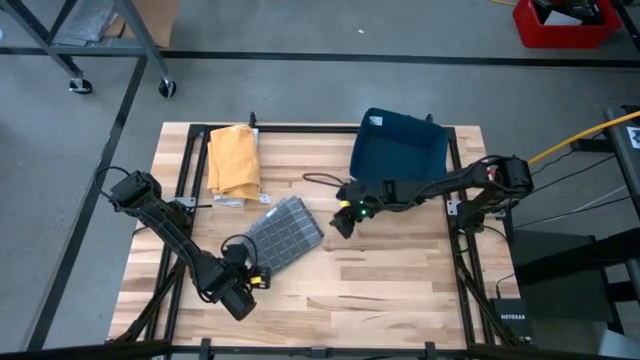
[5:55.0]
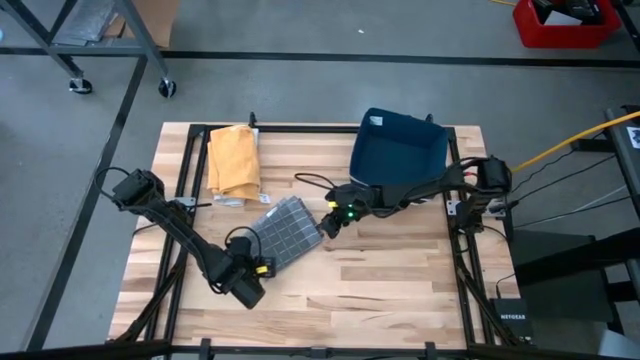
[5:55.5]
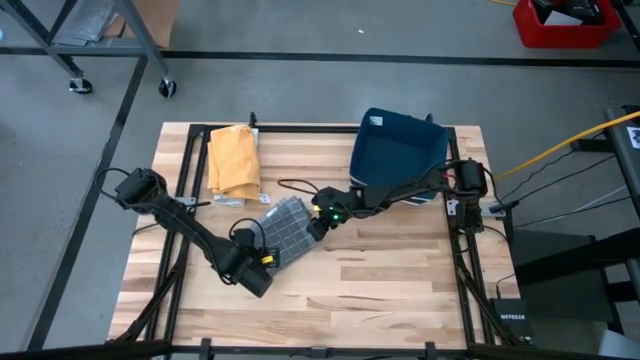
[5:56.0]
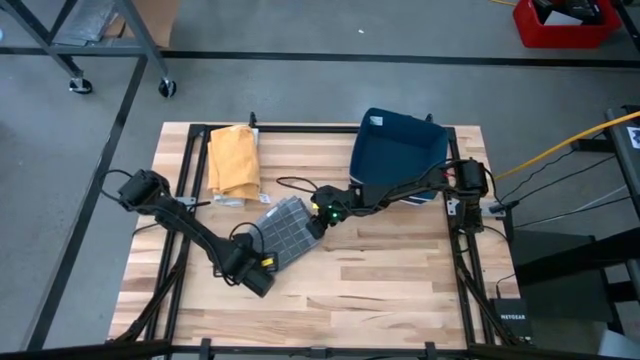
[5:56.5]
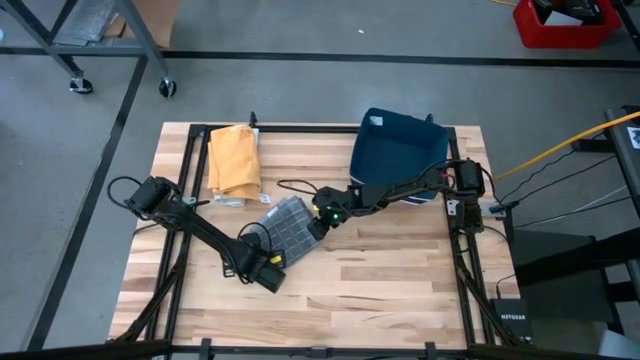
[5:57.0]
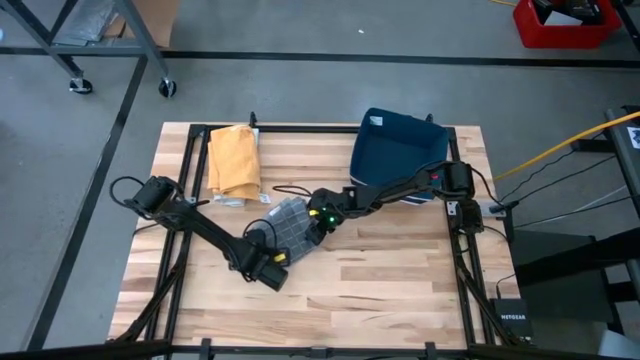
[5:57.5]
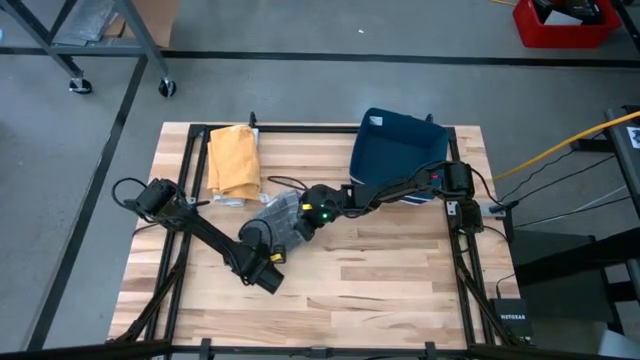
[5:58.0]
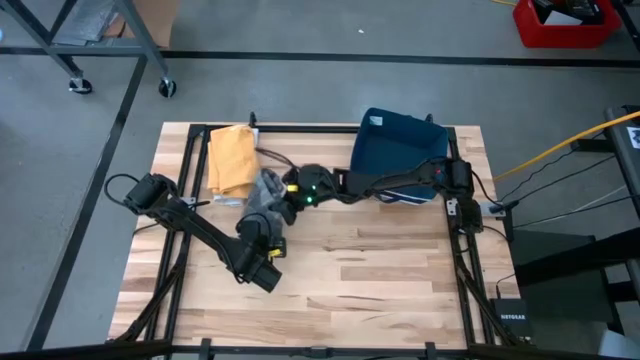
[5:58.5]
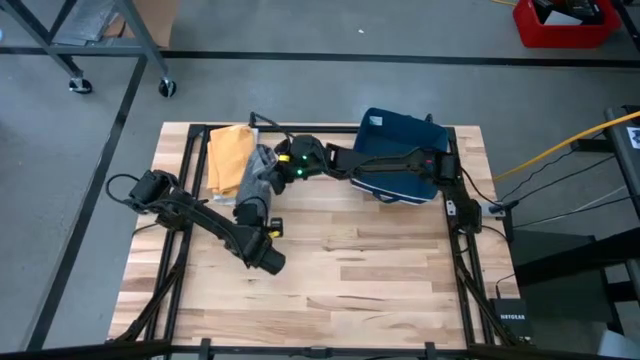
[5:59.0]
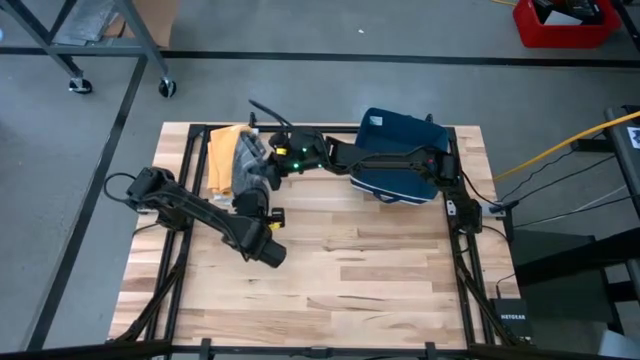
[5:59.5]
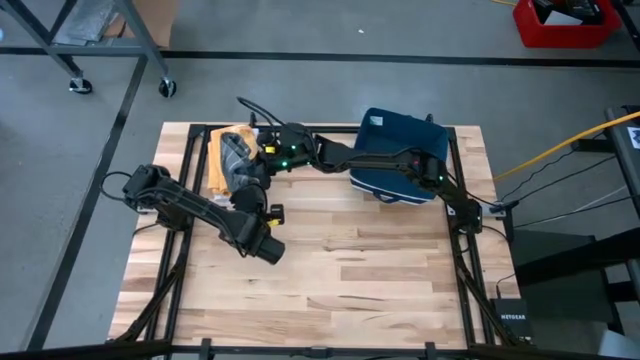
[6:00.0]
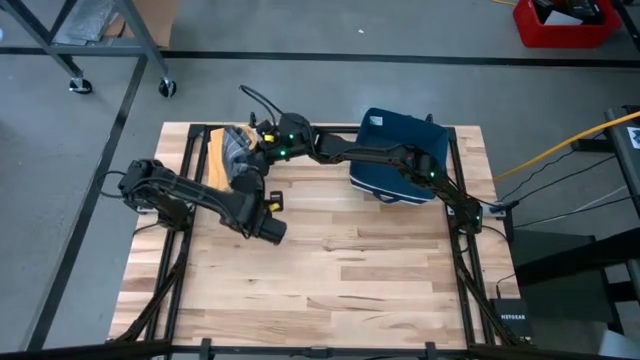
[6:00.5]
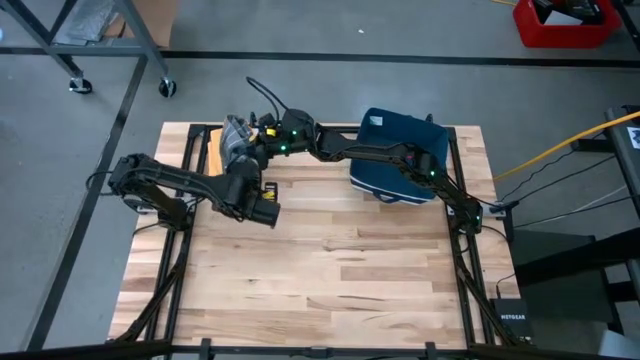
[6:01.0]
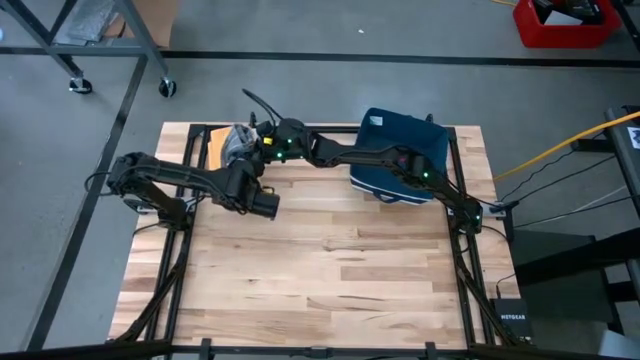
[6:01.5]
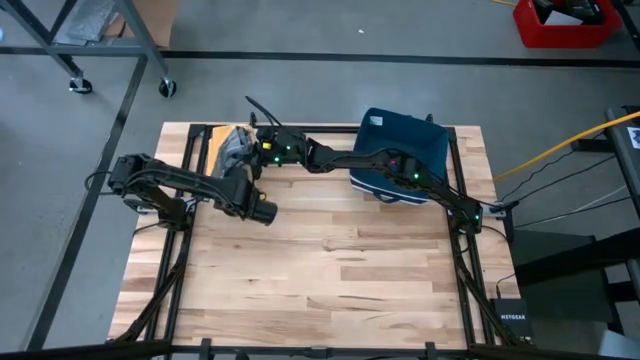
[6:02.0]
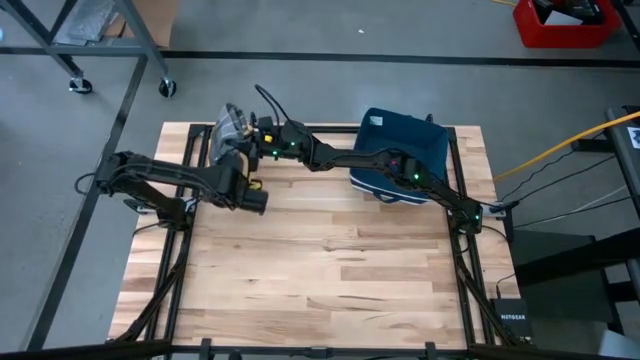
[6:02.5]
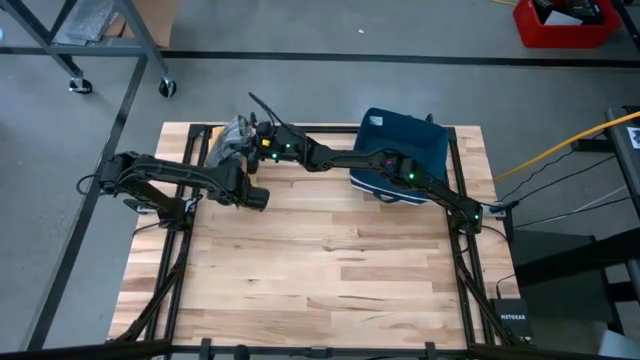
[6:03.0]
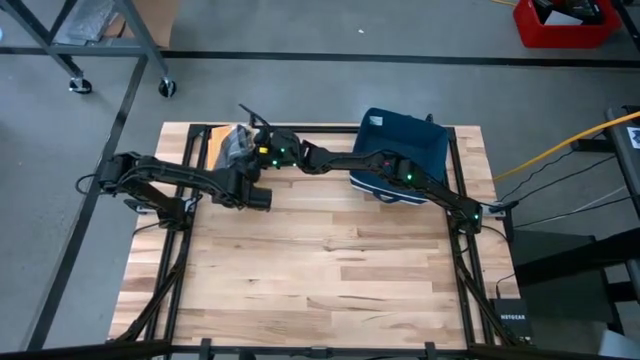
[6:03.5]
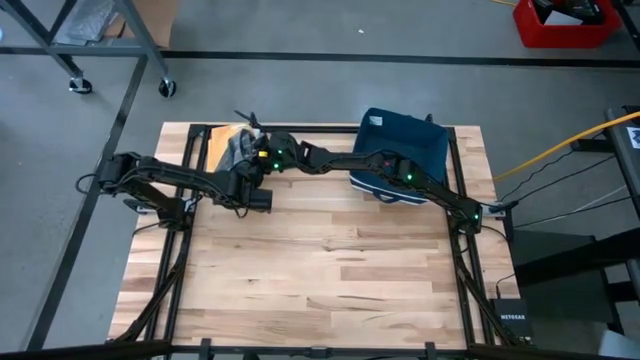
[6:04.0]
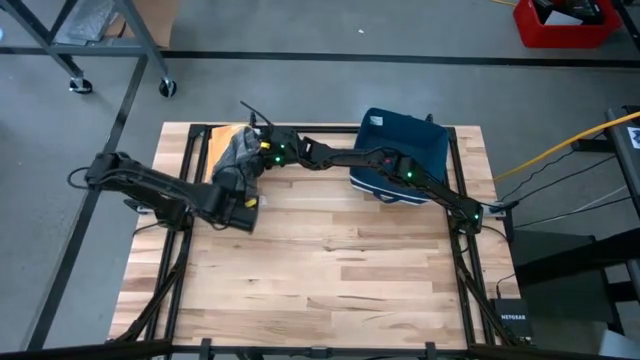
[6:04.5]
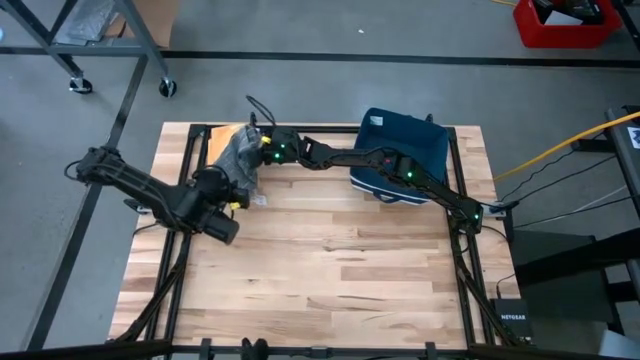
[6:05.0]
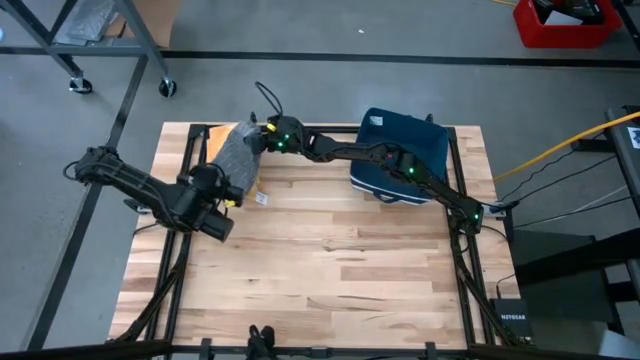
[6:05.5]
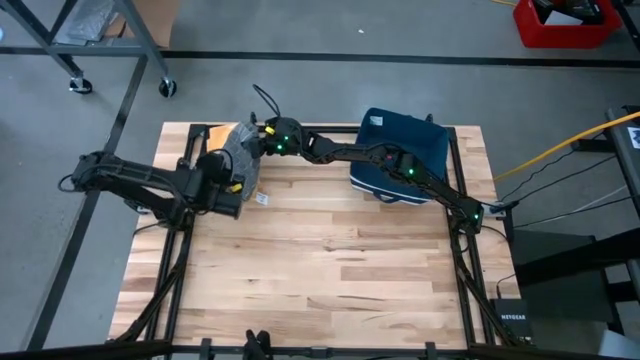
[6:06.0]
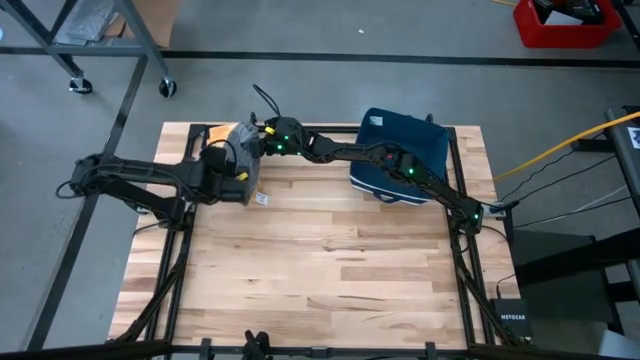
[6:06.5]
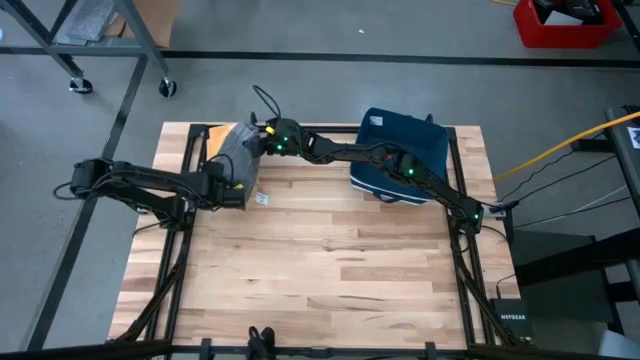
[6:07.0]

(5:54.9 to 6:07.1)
Task: Fold towel
Stack the gray patterned towel on top of the yellow towel

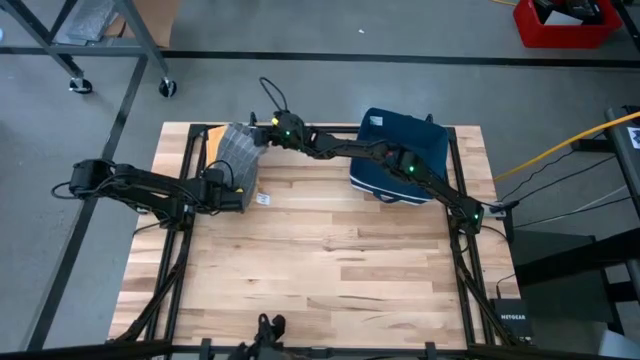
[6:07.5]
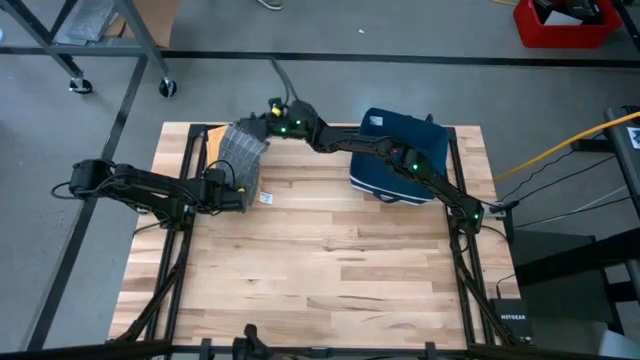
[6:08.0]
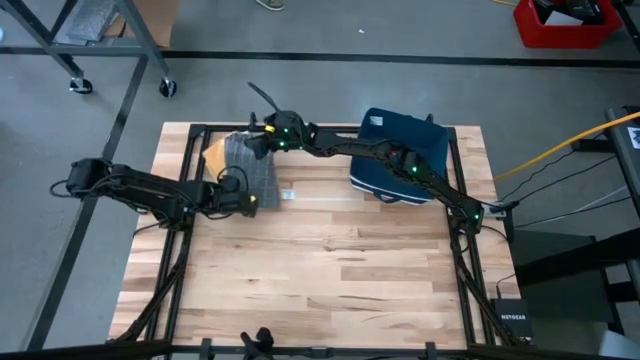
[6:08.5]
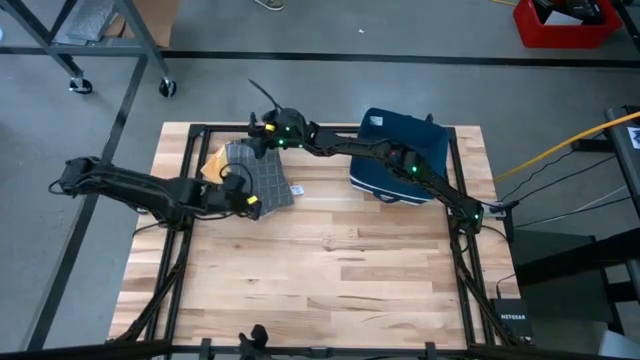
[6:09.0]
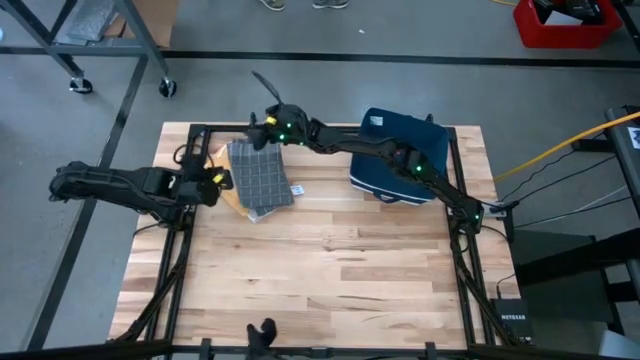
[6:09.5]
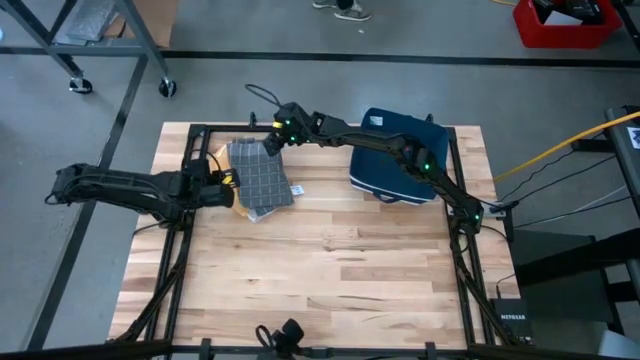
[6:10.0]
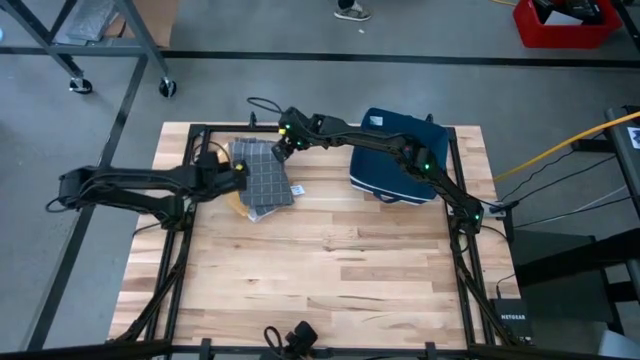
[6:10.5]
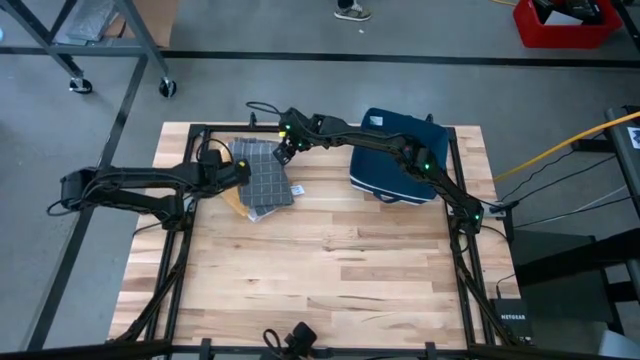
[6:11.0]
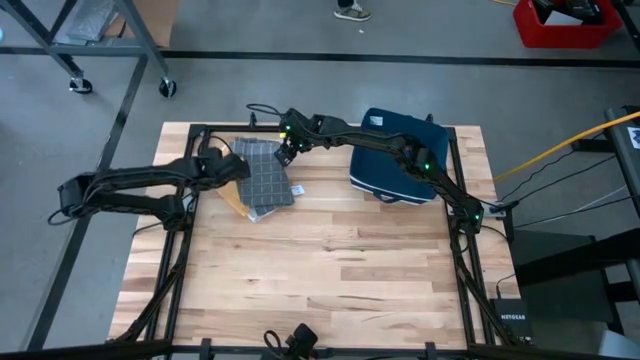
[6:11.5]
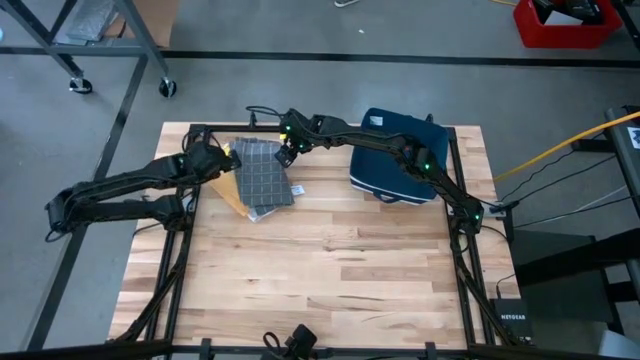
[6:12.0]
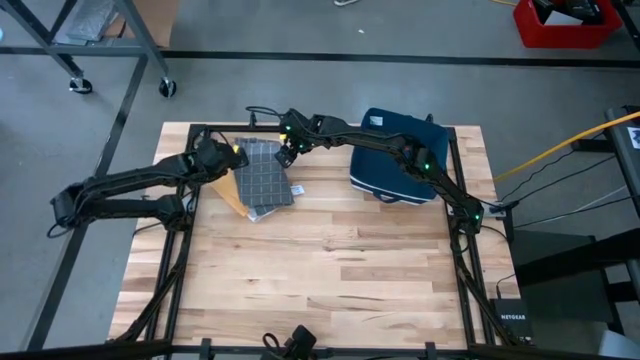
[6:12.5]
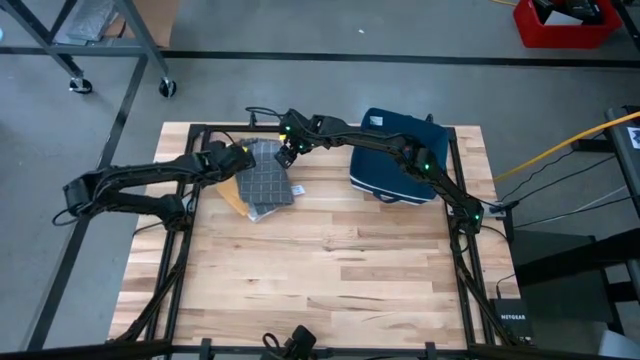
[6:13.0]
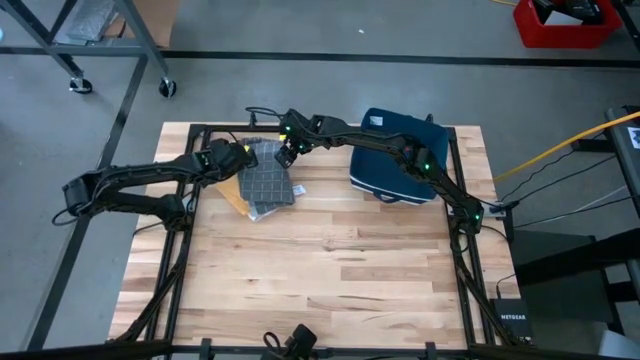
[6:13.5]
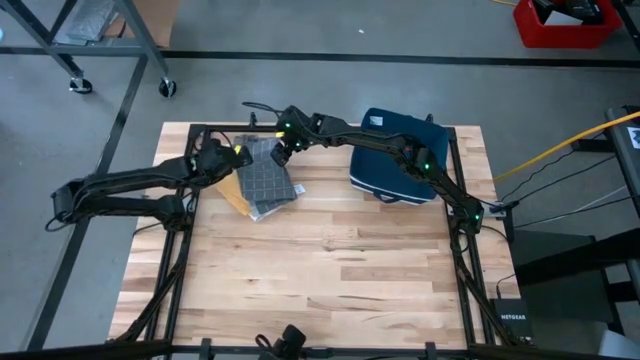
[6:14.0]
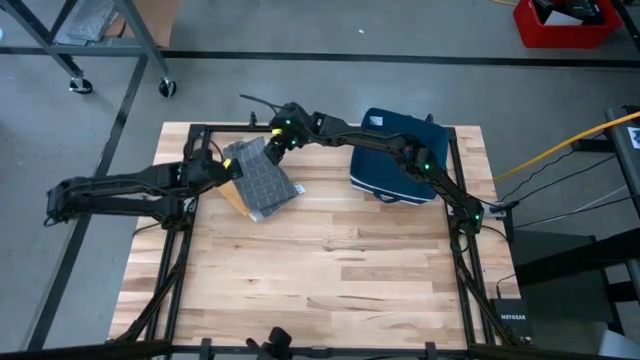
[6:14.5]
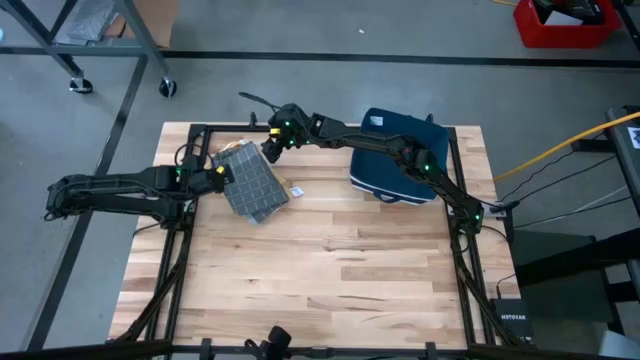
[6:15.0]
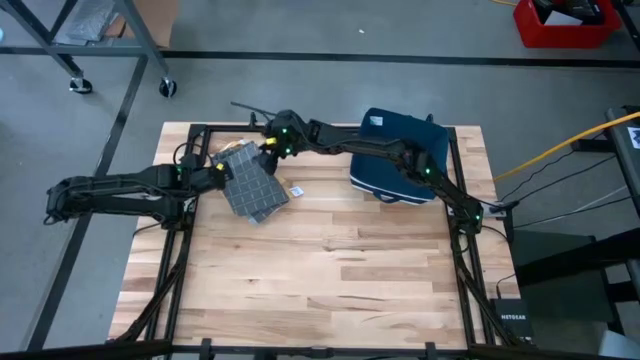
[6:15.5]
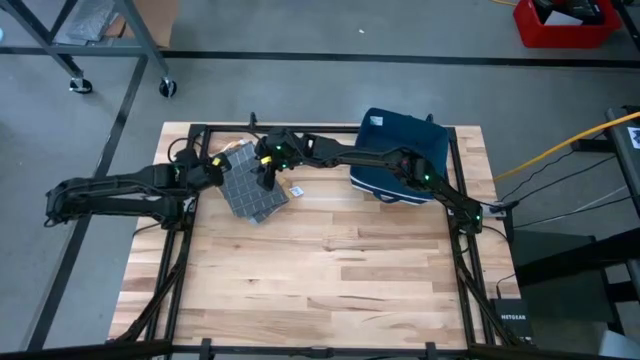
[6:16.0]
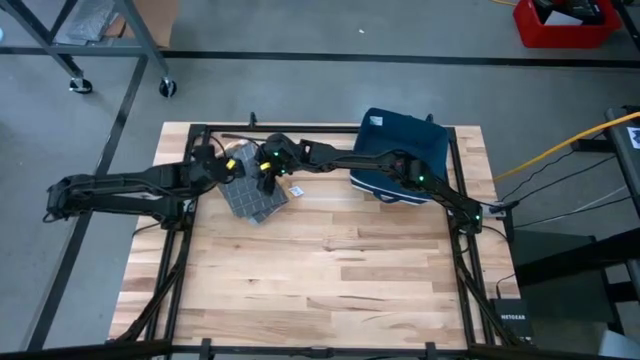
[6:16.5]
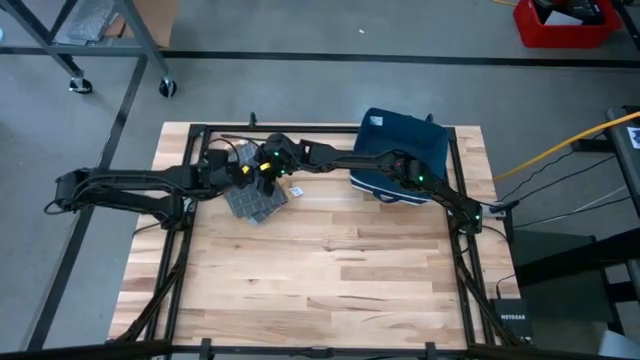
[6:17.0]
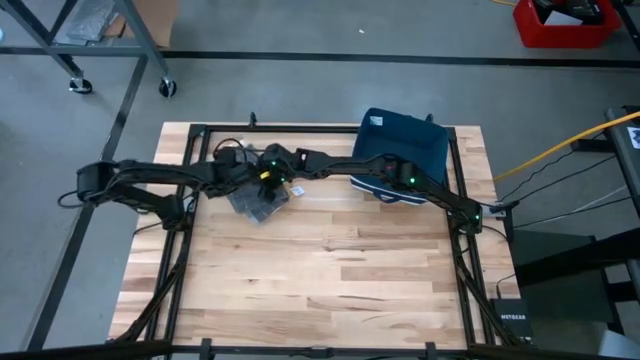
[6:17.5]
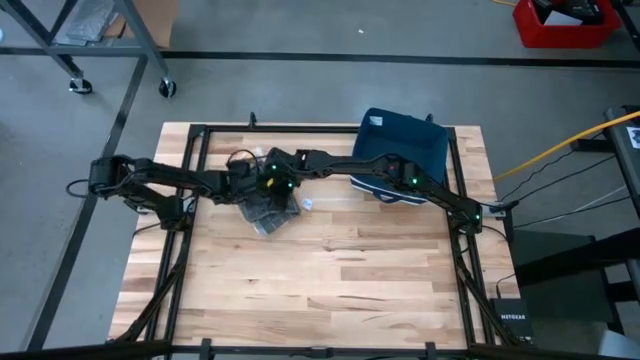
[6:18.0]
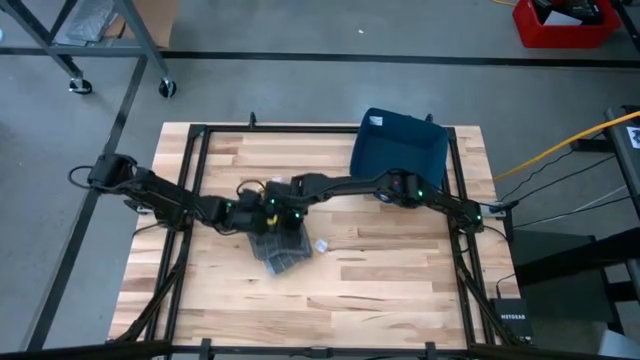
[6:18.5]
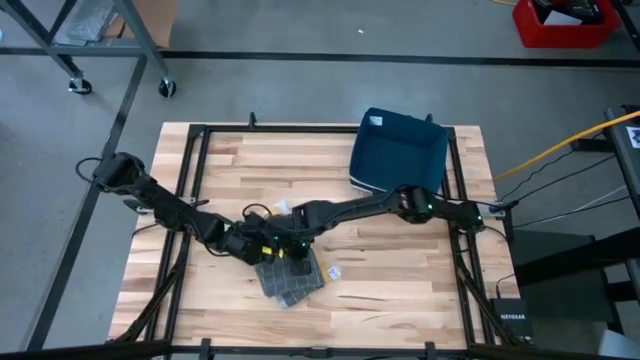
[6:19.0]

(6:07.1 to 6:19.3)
Stack the gray patterned towel on top of the yellow towel
